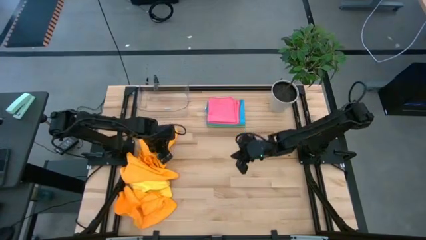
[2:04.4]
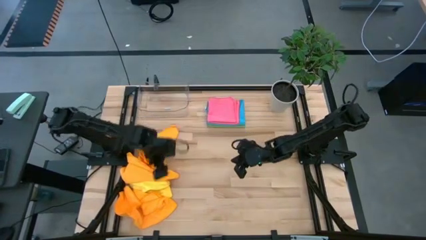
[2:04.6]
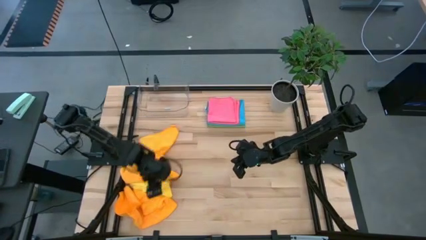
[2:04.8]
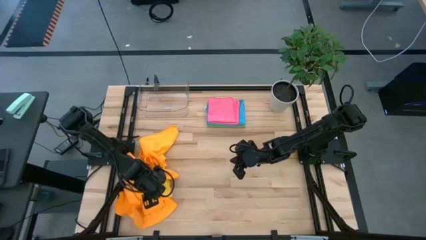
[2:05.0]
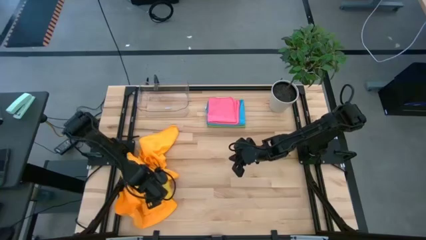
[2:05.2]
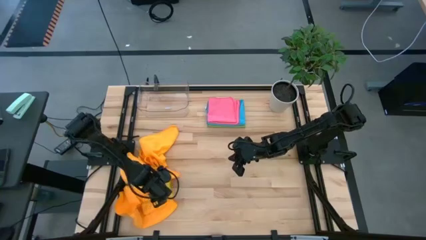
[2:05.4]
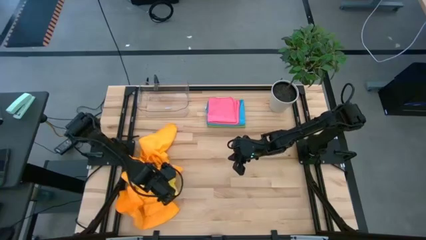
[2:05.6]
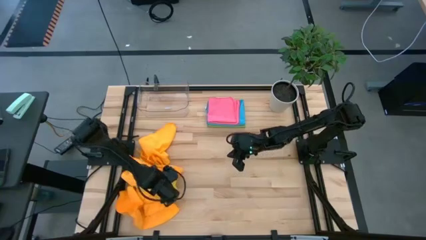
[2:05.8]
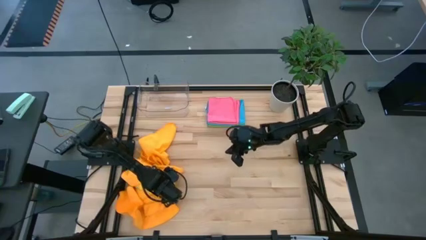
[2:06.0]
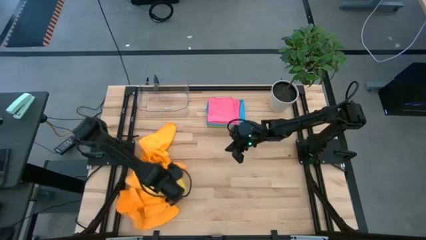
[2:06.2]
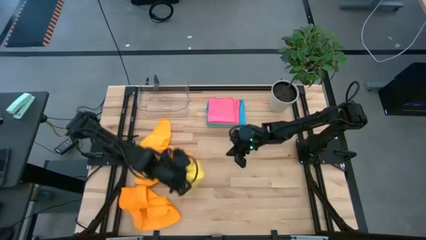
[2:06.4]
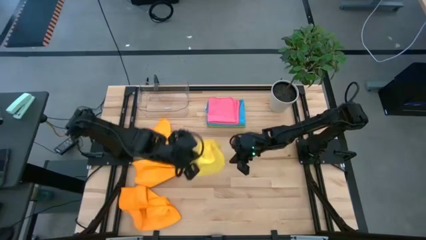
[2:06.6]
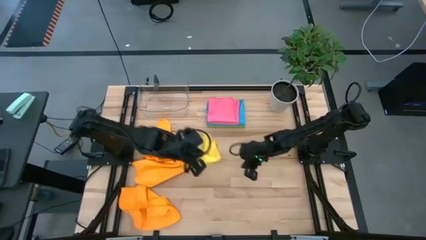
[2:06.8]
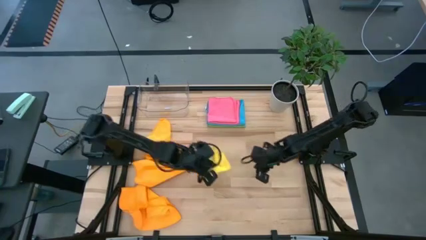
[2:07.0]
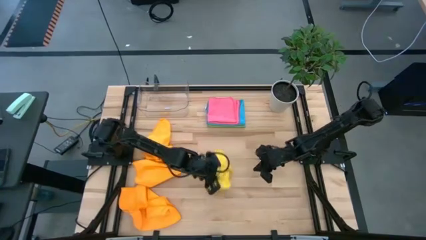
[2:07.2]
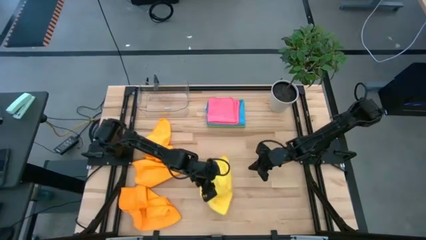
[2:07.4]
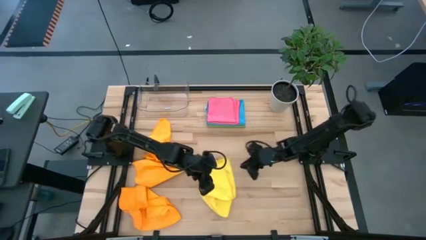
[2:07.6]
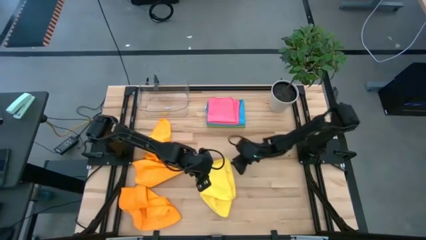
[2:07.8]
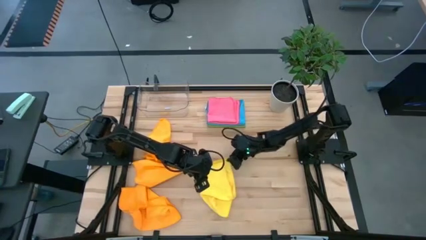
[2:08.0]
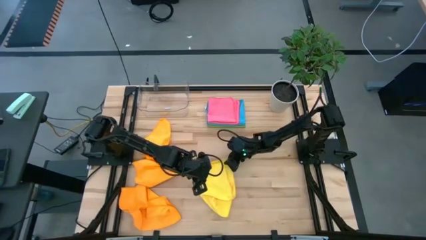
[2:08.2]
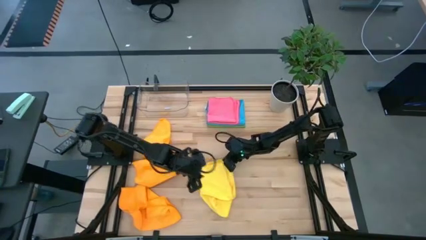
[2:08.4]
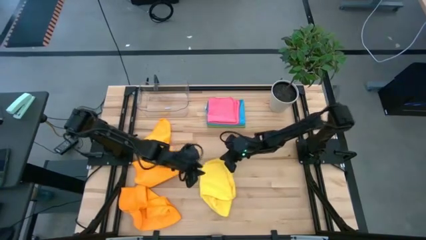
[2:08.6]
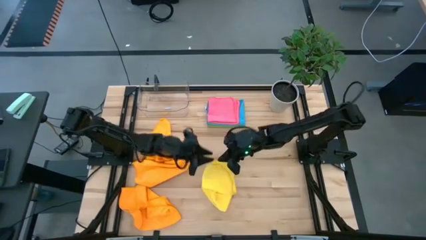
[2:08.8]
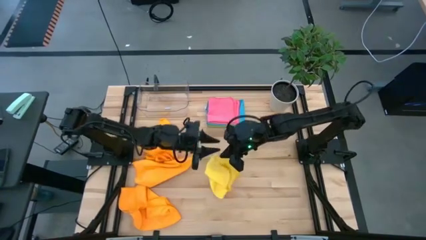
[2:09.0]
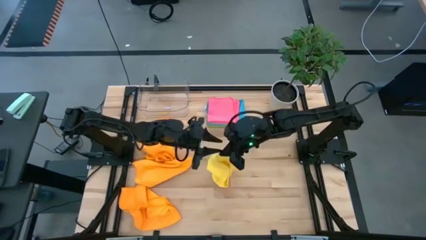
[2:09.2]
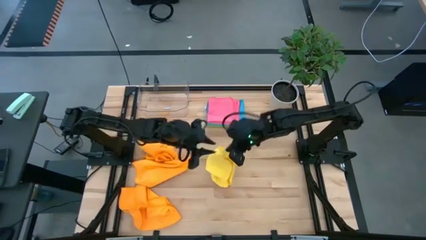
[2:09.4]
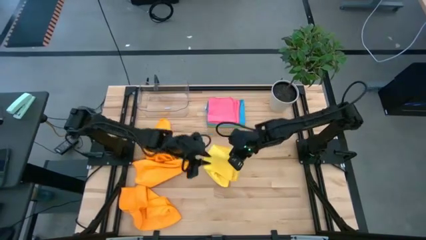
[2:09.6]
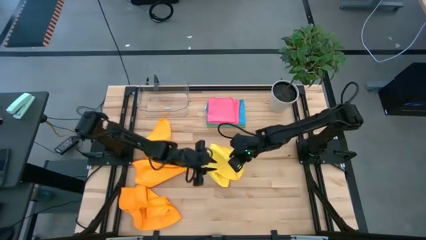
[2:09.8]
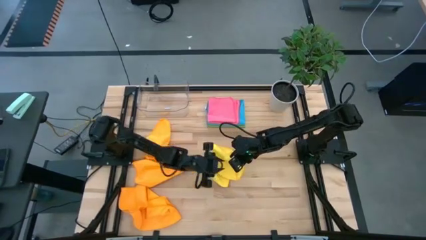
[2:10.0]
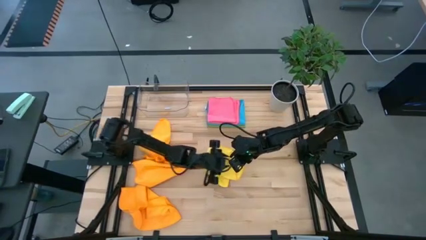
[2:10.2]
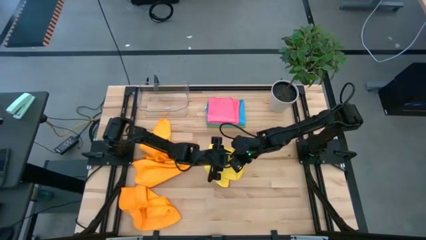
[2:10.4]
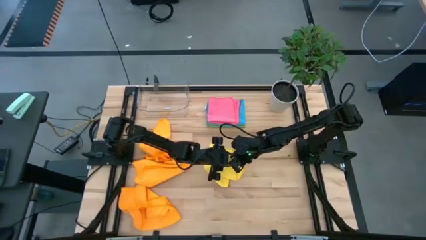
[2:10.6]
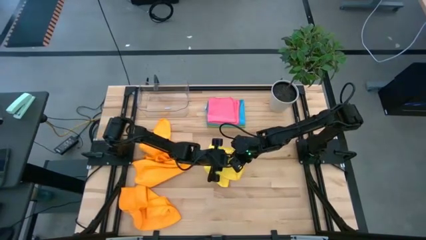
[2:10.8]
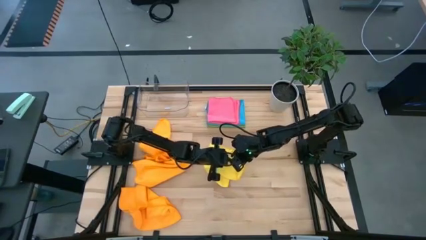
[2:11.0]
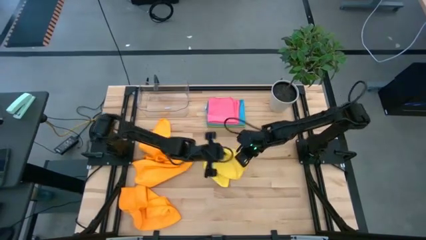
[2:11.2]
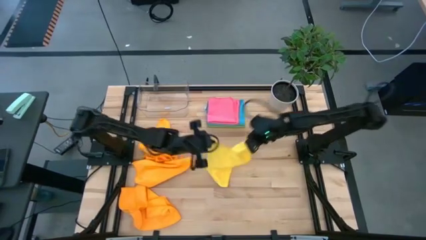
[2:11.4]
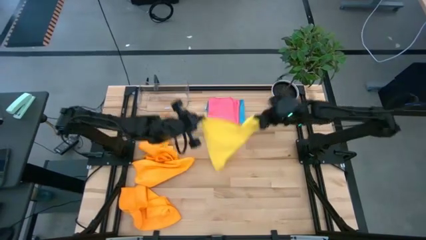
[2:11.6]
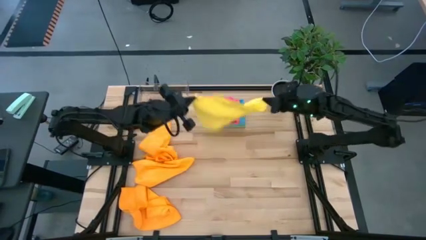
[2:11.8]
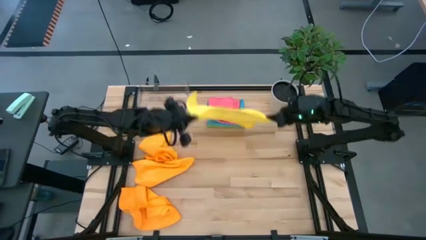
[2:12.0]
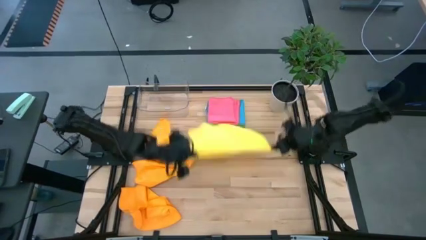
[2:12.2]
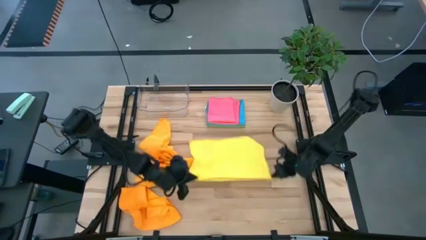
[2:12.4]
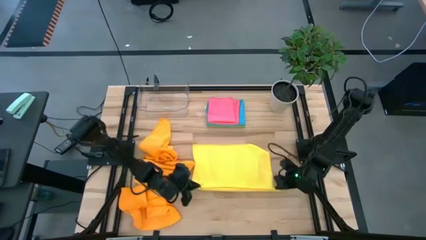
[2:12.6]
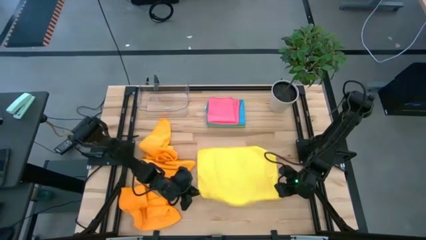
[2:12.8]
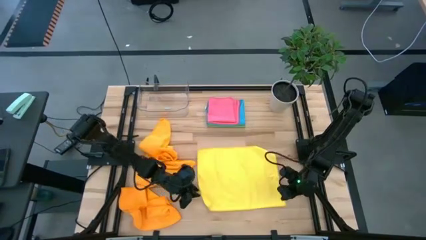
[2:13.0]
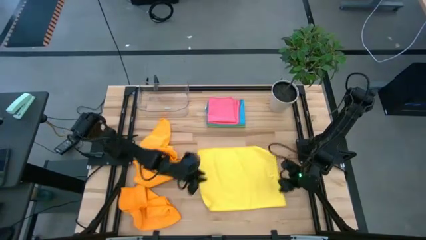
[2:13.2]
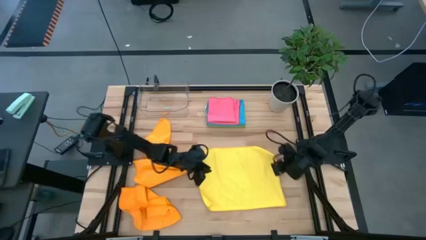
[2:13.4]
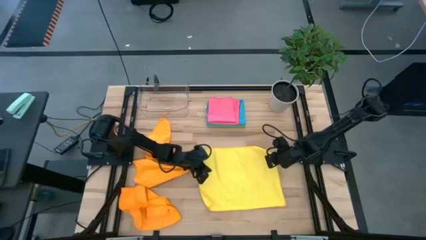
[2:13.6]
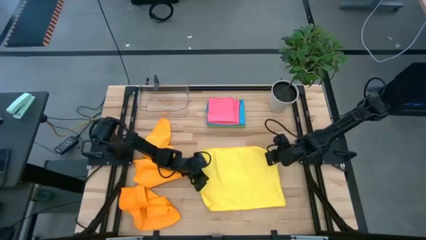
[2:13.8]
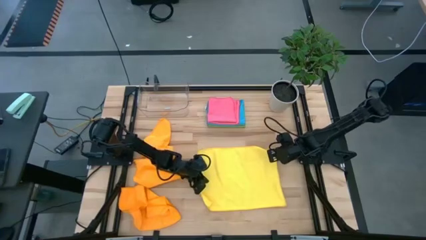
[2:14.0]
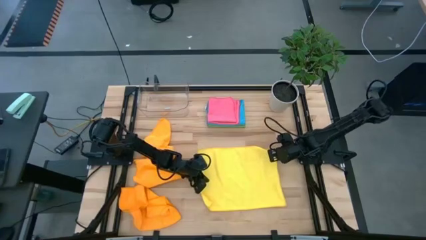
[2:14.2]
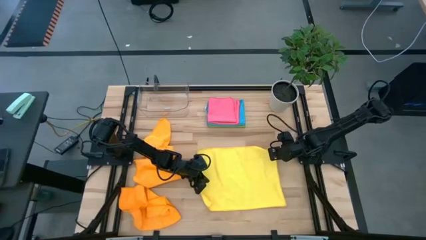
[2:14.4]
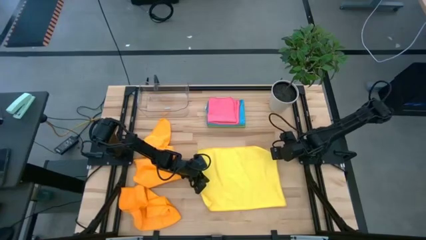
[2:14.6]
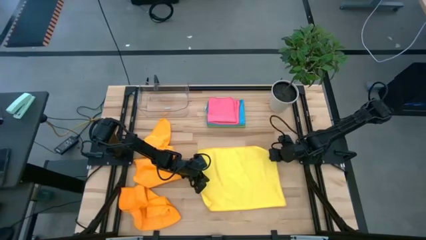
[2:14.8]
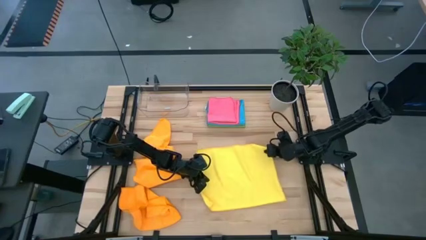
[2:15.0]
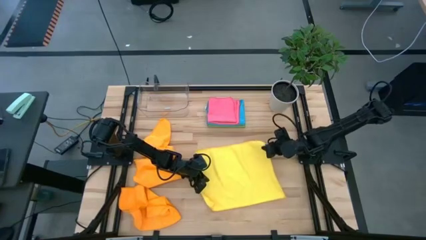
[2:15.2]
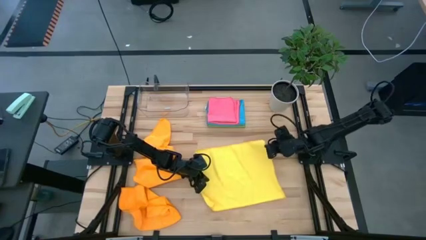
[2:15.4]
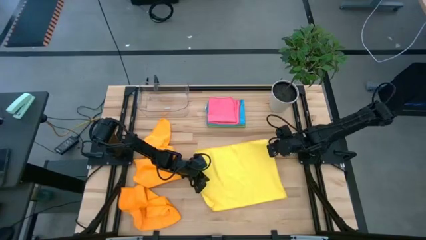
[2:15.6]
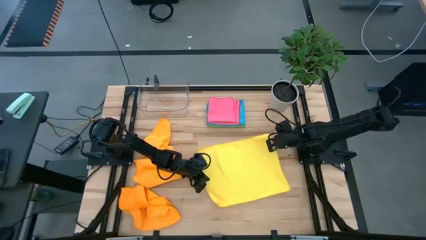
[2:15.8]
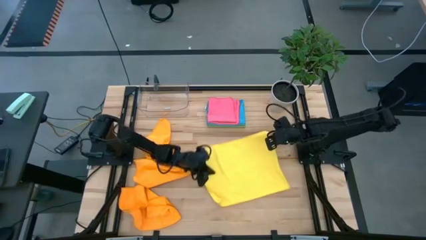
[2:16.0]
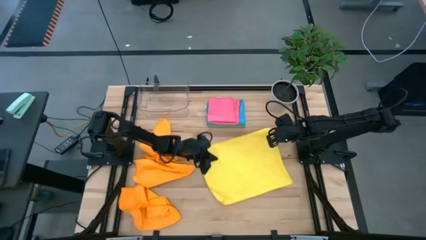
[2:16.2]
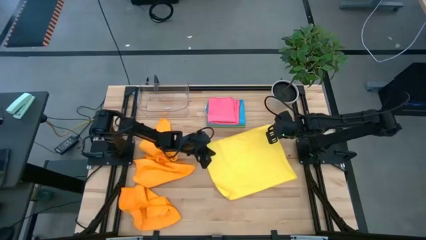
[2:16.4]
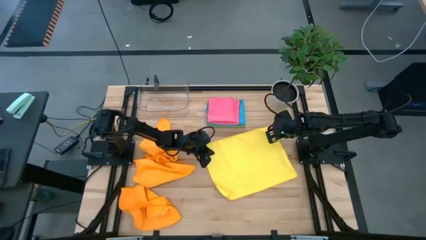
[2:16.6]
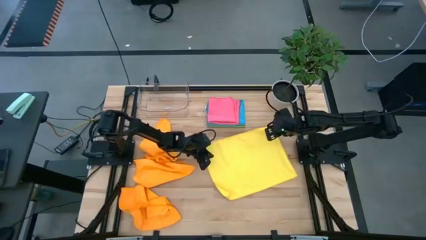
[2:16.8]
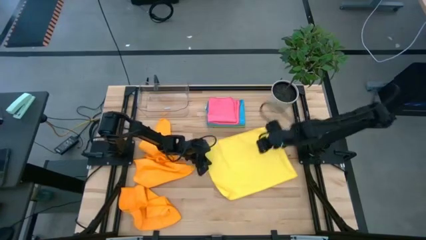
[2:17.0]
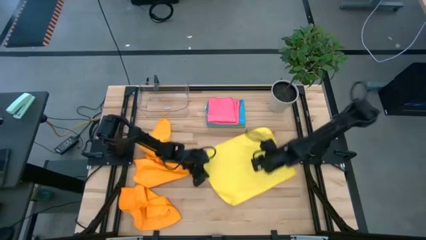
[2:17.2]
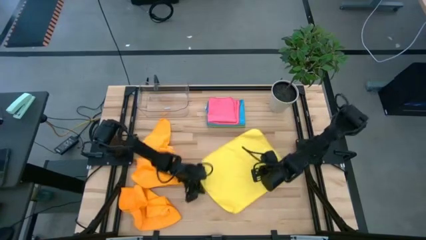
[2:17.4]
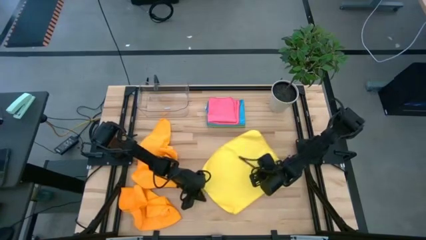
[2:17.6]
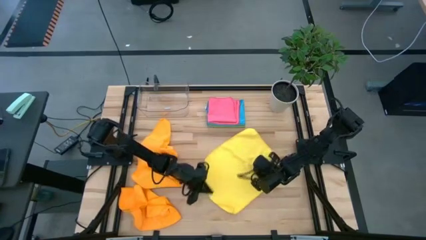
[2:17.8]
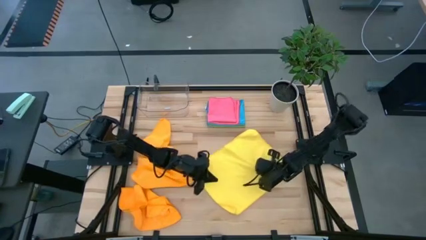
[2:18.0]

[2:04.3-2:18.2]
Task: Fold microfiber towels
Fold the yellow towel

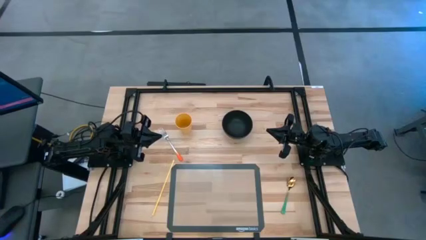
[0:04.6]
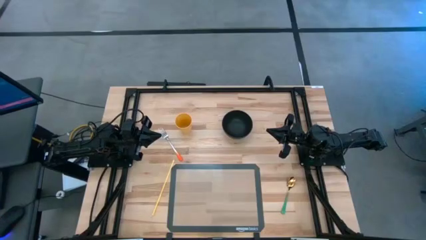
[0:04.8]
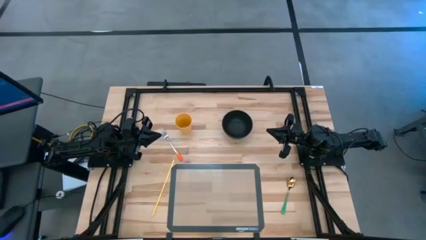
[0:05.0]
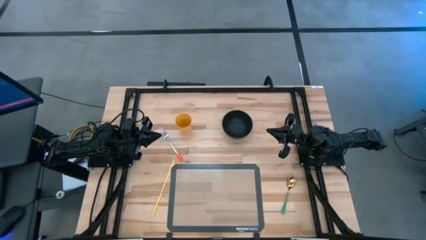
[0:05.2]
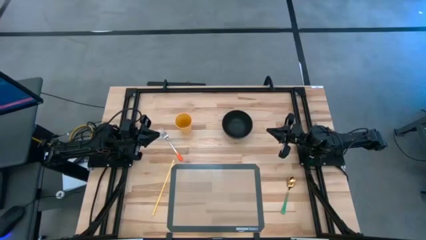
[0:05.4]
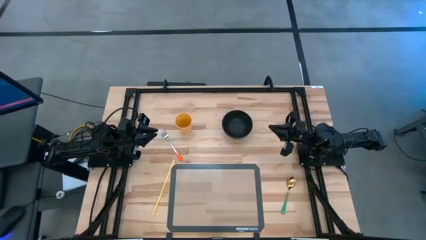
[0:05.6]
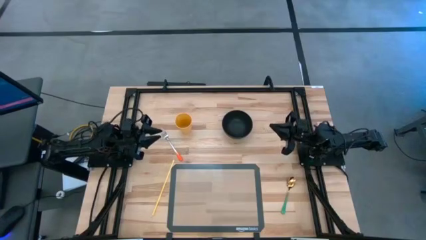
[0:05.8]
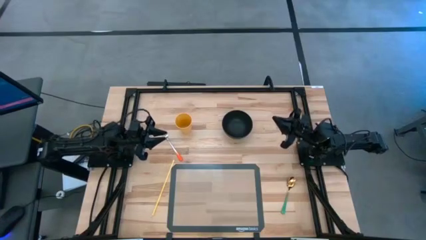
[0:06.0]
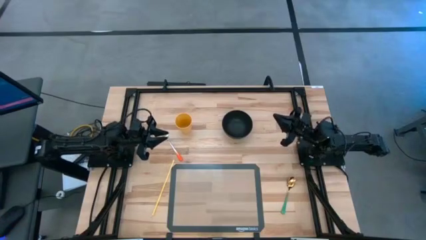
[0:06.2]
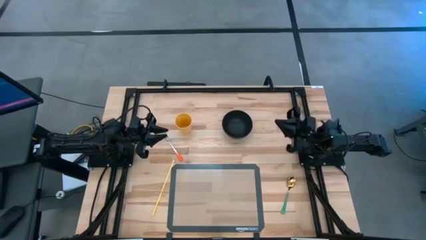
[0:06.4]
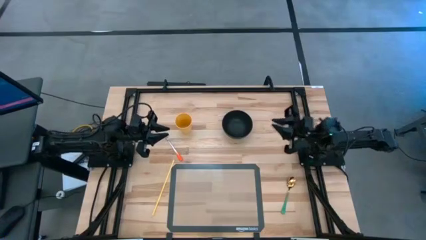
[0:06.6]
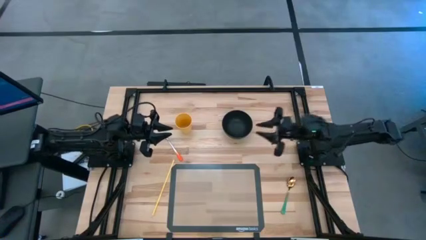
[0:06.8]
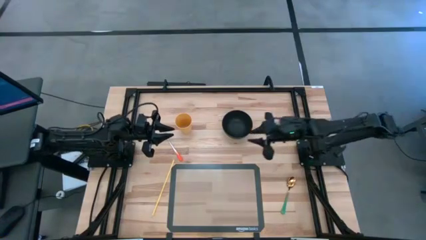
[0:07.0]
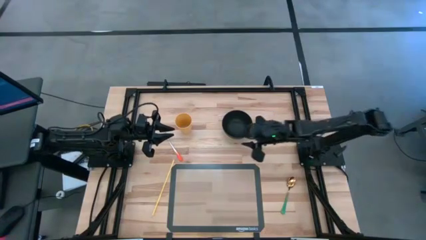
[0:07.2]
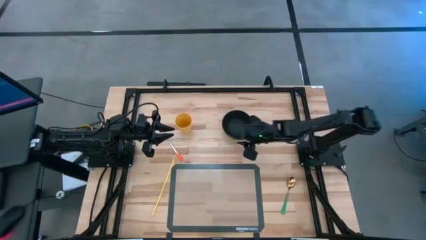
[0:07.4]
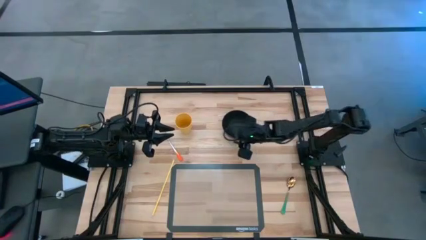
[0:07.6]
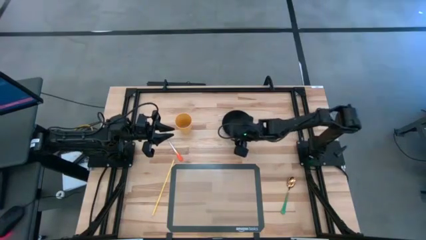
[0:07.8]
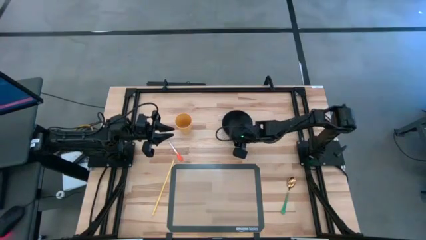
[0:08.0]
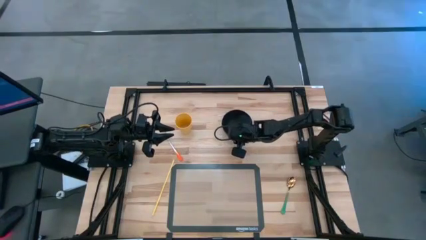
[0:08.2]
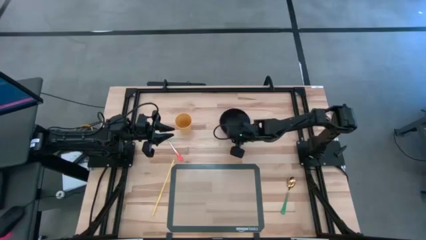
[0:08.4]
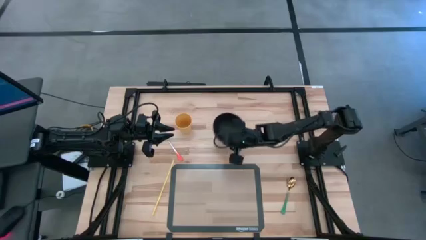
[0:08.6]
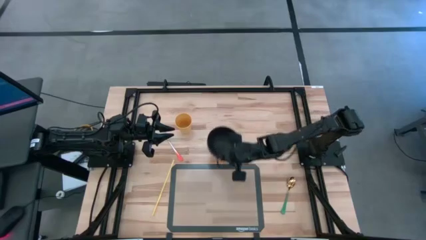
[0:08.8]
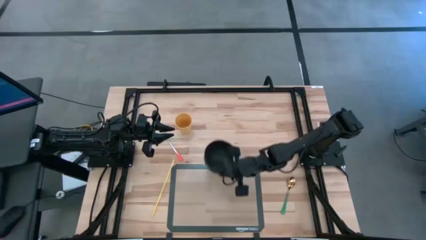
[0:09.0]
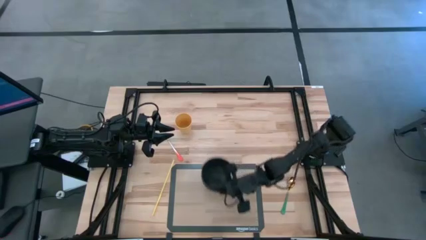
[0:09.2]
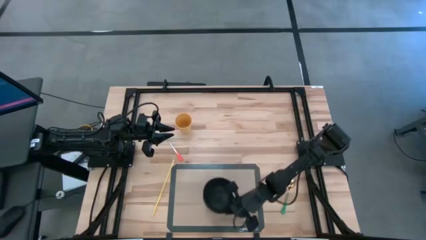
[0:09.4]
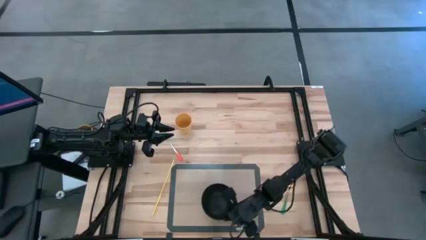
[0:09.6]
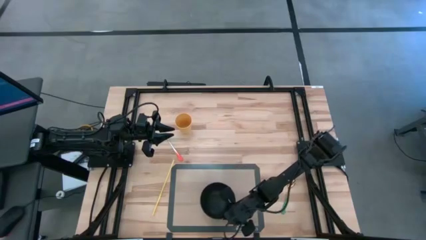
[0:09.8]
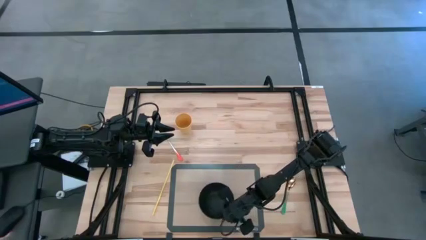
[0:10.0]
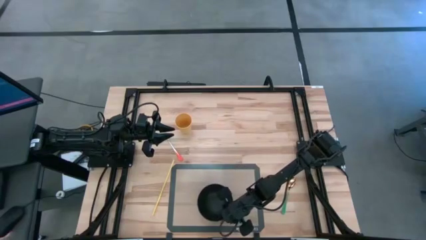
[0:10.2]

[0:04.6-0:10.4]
Task: Pick & Place Utensil
Put the black bowl on the center of the transparent mat
